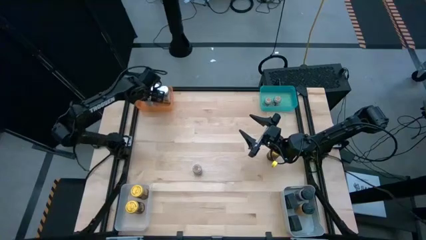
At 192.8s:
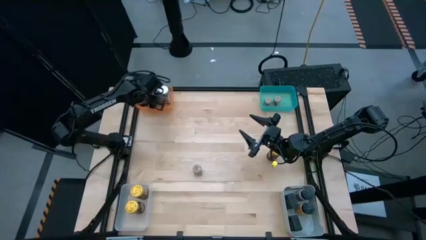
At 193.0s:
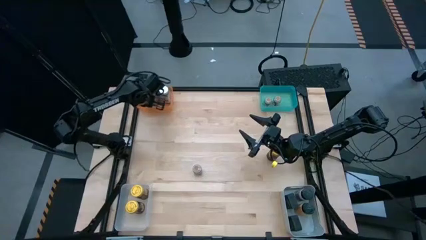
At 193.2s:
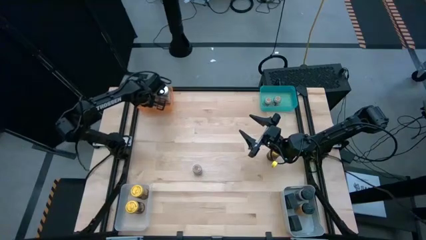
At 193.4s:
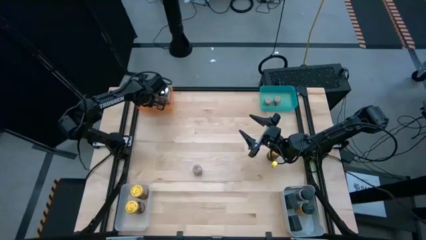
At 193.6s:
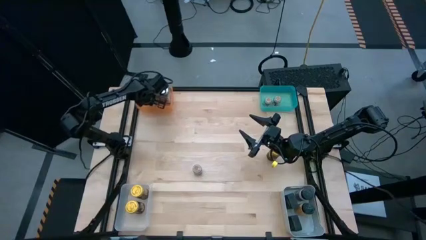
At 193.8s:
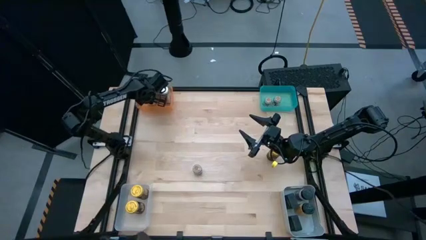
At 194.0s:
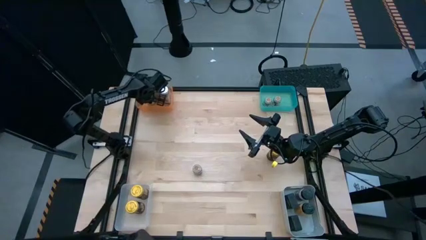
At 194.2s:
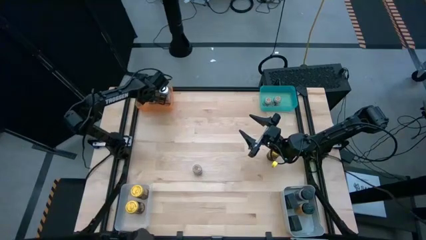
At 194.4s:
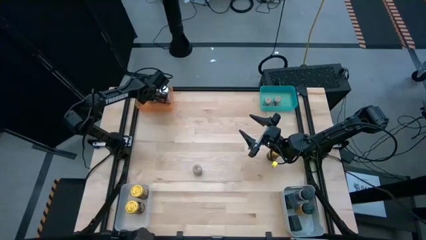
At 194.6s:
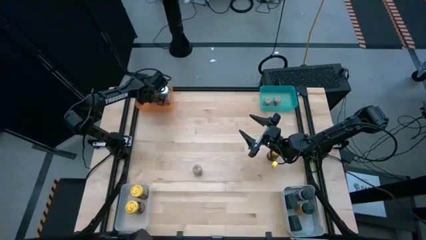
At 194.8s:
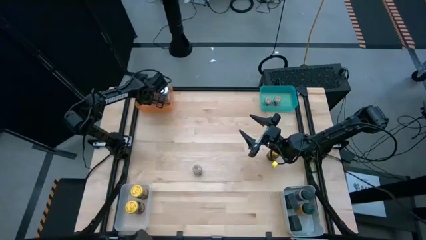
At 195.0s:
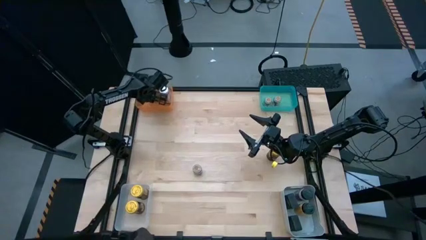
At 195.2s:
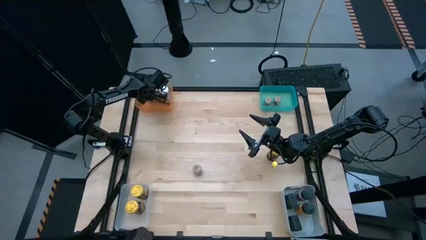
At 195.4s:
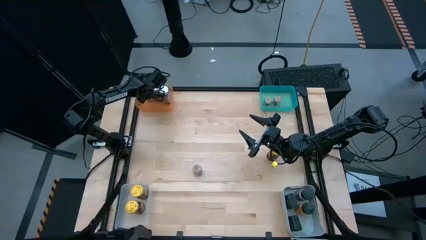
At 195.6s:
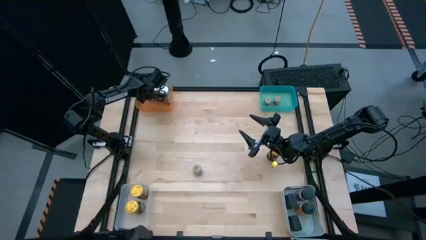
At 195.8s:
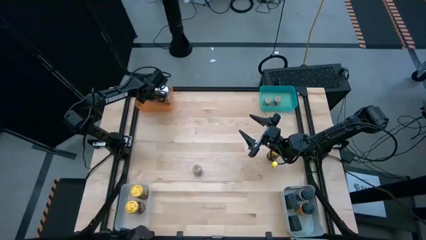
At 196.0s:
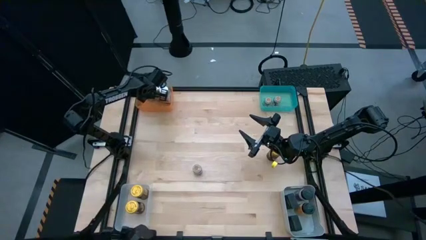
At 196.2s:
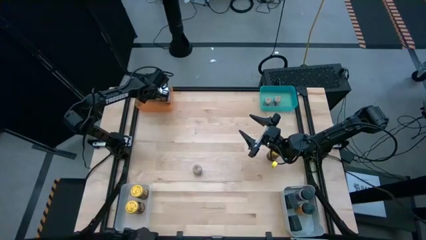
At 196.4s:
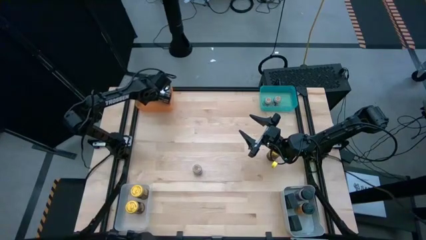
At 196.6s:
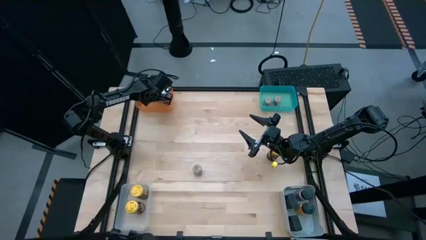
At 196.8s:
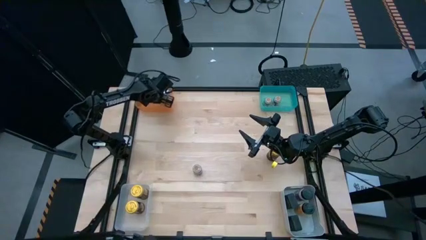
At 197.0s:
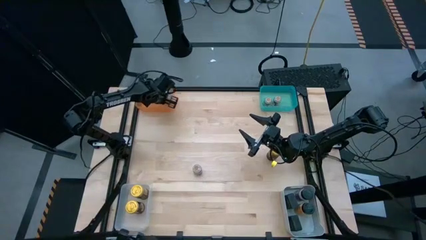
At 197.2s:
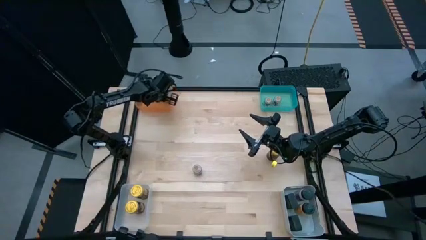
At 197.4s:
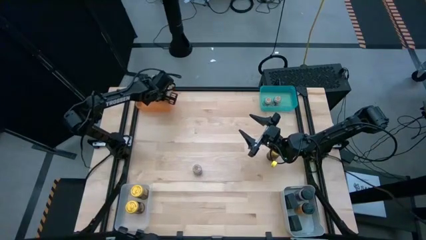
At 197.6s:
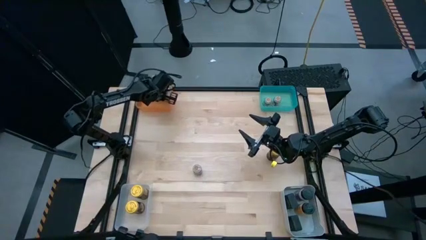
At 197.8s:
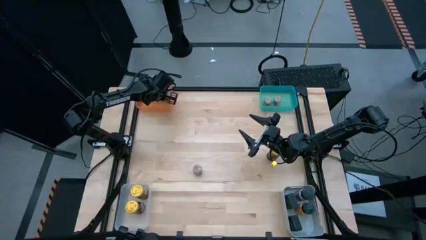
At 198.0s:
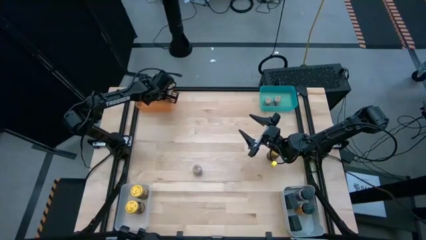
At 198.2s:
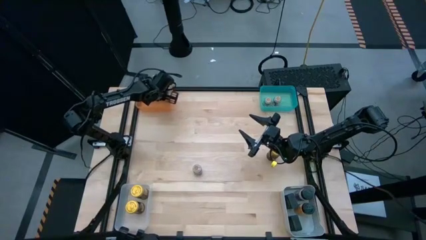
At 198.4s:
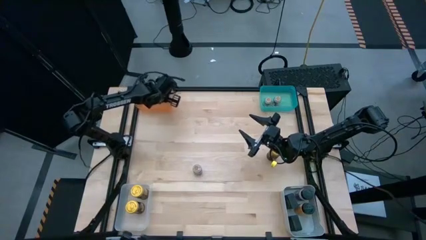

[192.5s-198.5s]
Task: Sort spices by type
Adjust the white seasoning bottle

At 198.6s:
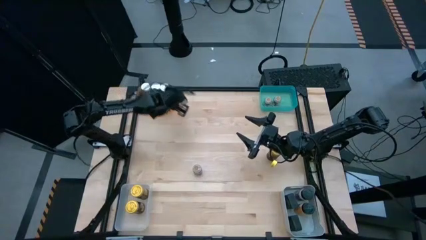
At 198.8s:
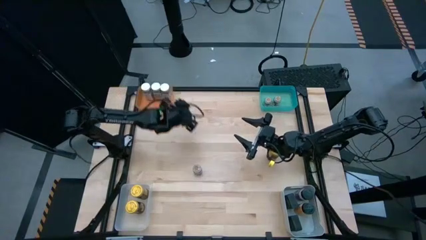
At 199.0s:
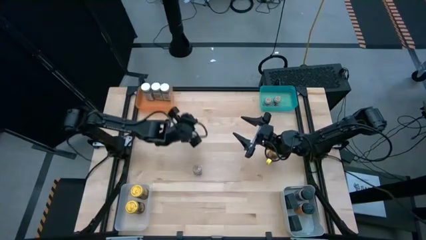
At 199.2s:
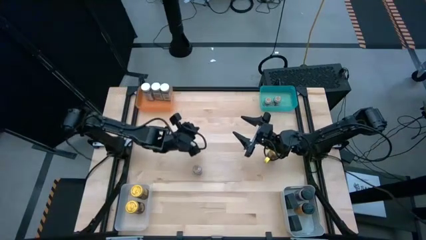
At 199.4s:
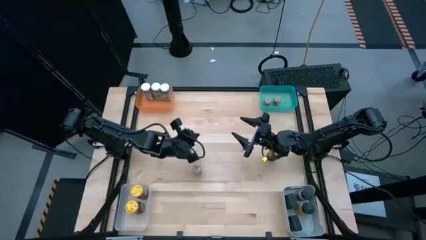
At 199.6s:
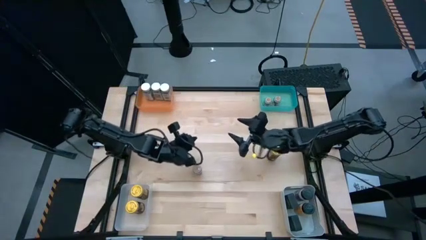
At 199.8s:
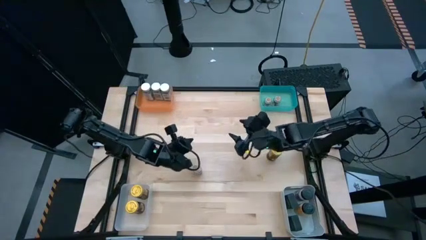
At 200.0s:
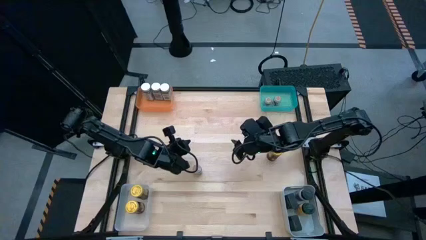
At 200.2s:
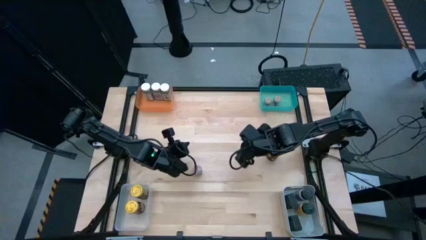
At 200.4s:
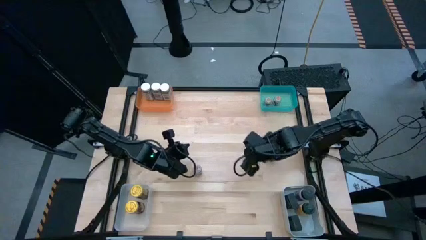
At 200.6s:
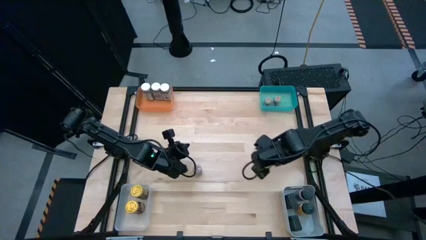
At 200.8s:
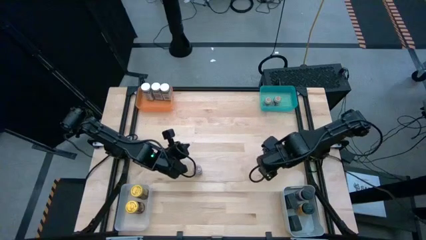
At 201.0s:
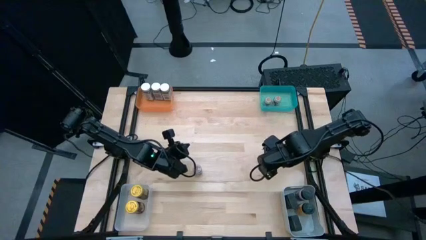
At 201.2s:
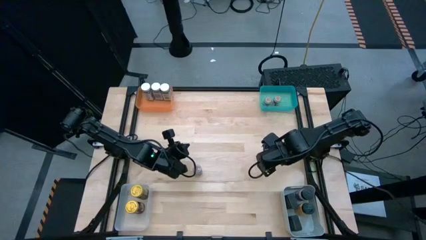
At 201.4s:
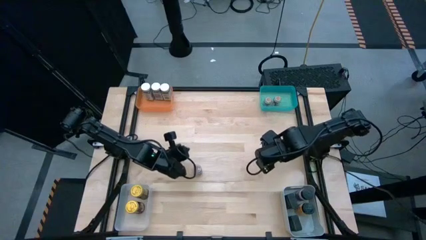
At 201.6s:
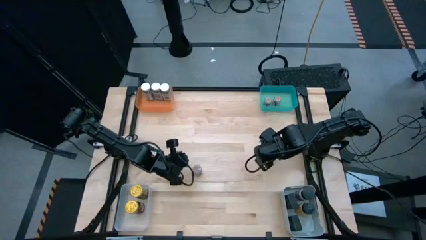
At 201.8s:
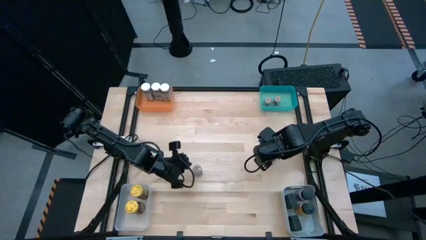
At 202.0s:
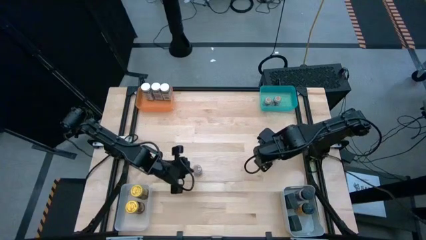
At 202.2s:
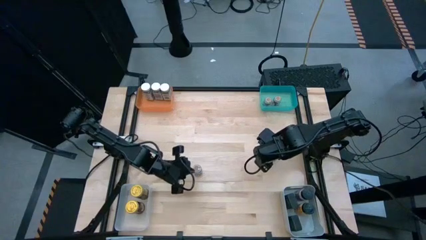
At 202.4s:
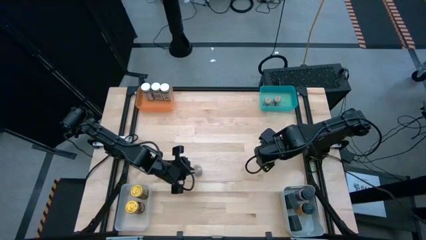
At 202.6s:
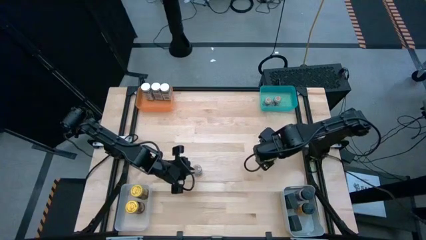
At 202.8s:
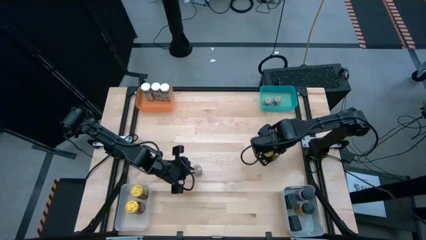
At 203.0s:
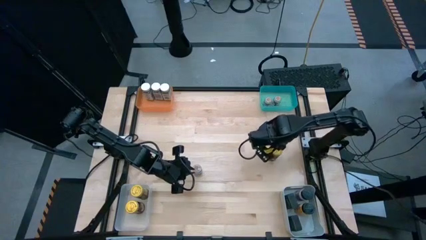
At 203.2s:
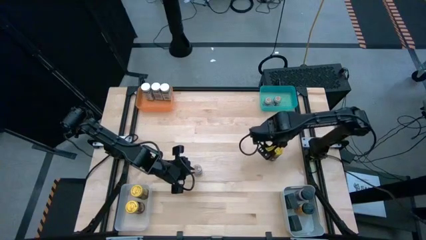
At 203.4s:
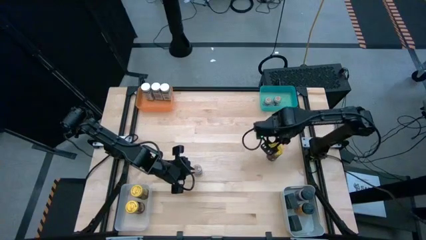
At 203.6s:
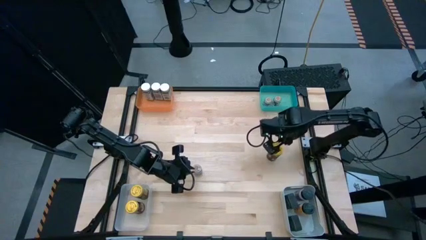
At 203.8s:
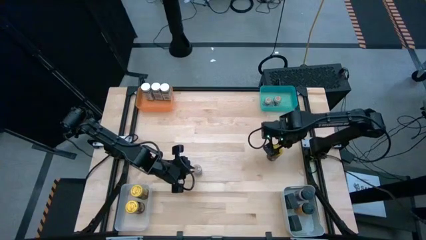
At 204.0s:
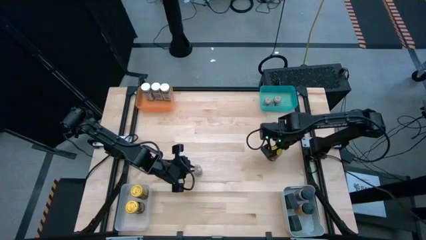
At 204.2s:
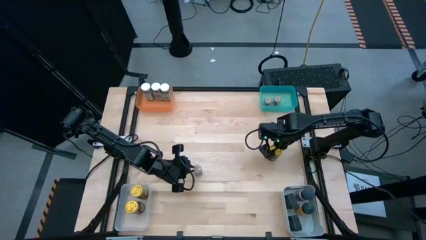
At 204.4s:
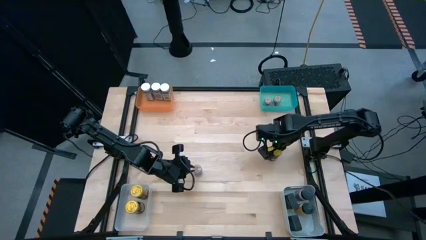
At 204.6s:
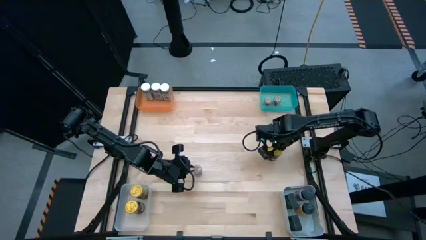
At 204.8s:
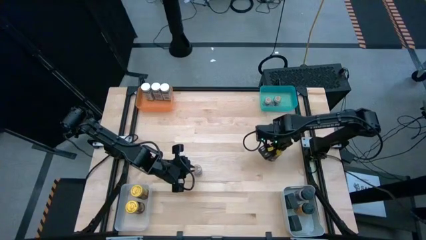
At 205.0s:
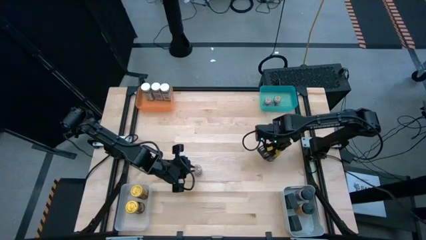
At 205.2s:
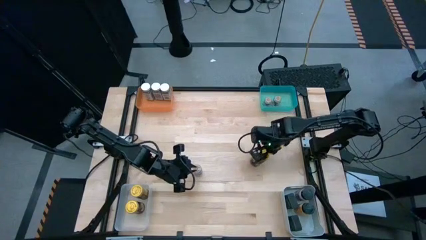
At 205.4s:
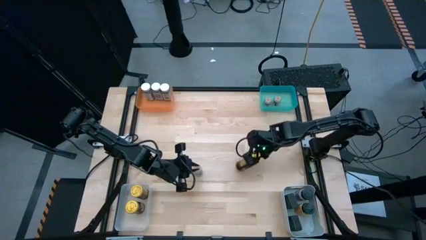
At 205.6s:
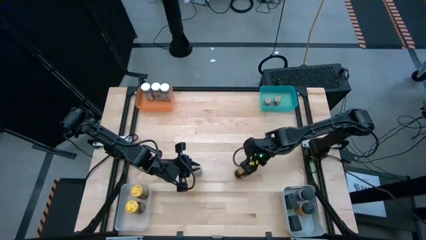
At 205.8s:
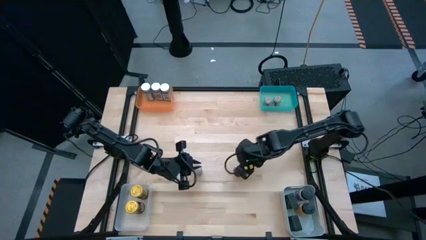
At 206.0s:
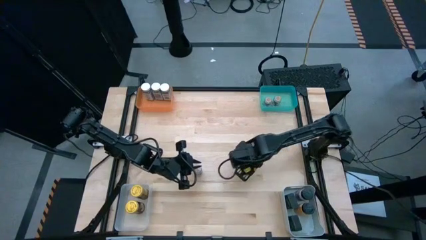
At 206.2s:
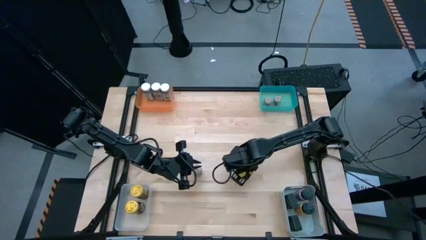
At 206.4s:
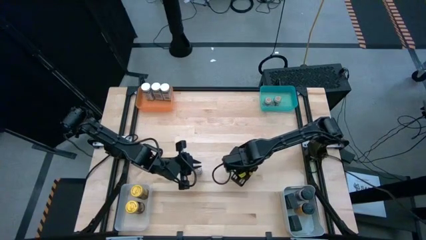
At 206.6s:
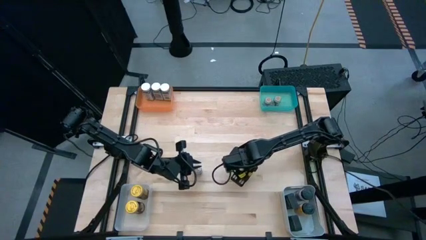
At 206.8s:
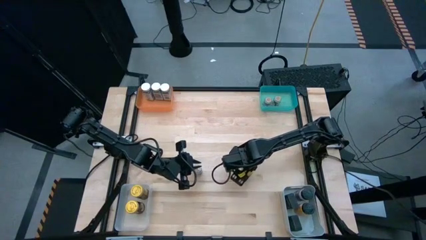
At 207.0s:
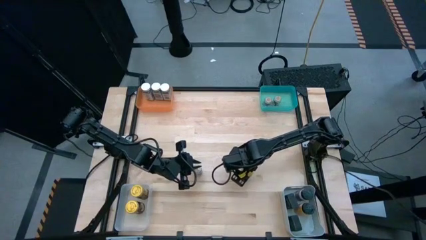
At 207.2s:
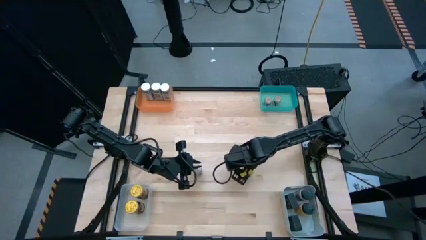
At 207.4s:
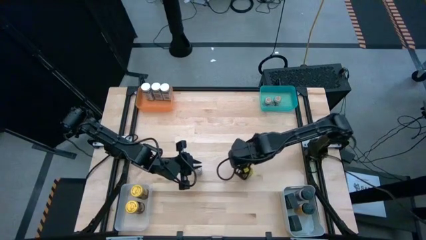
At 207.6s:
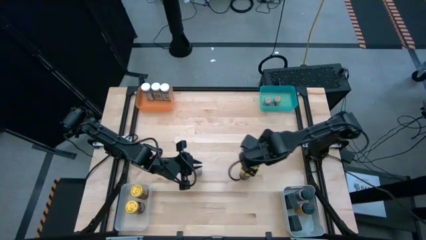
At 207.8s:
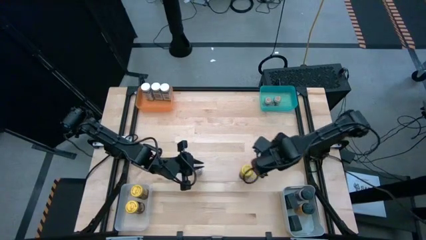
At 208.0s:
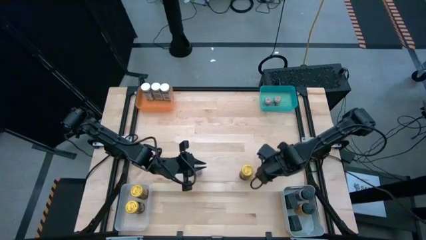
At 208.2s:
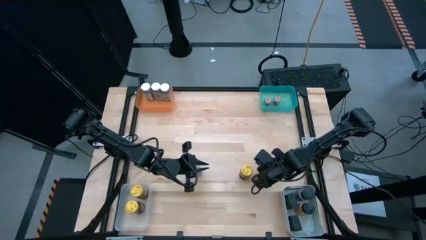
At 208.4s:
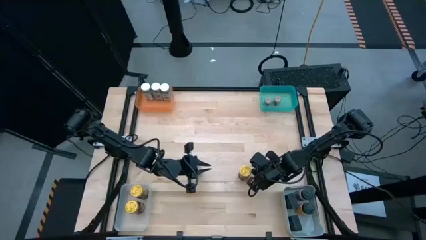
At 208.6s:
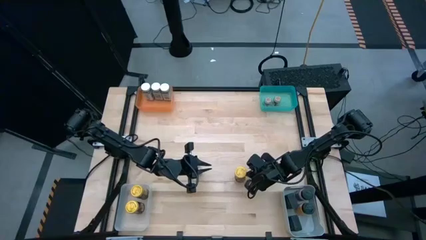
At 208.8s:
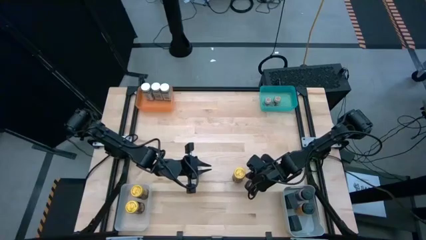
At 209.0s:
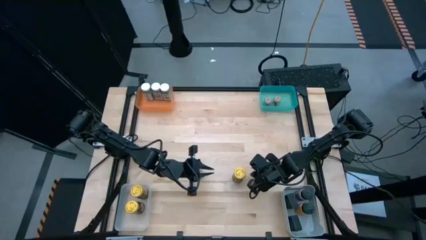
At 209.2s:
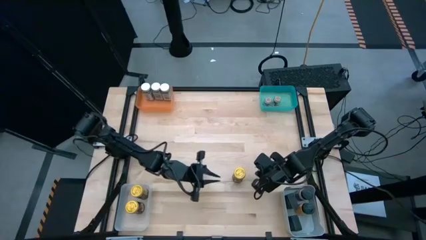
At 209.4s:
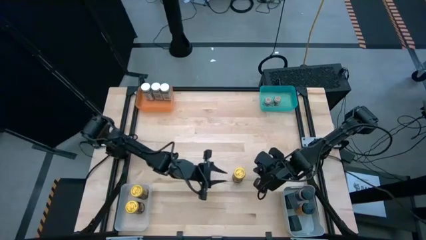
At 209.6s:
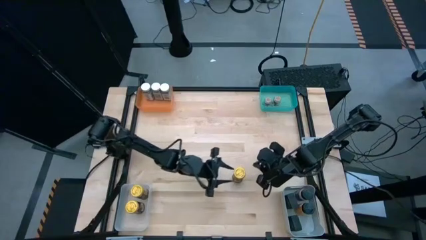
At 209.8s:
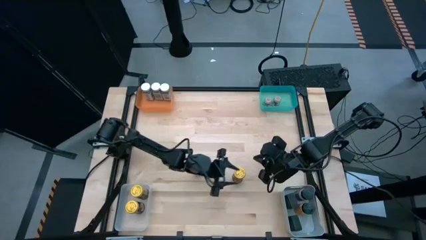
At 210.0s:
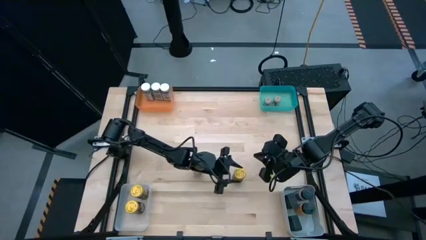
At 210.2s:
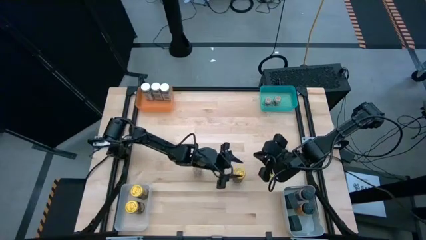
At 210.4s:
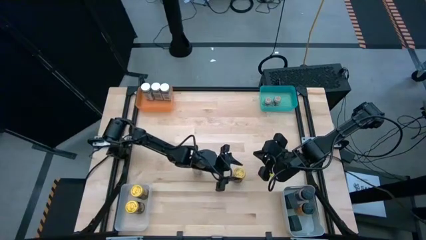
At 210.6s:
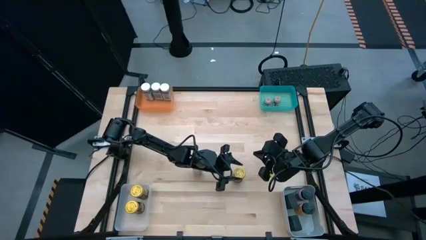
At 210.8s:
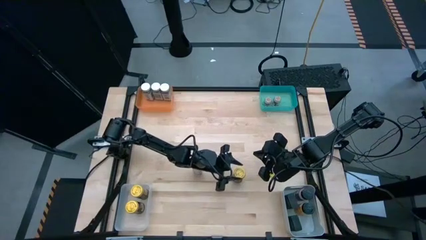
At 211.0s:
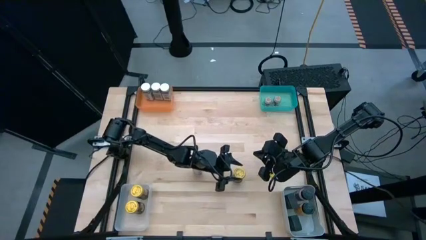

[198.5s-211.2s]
Put the yellow seasoning bottle into the transparent bin
